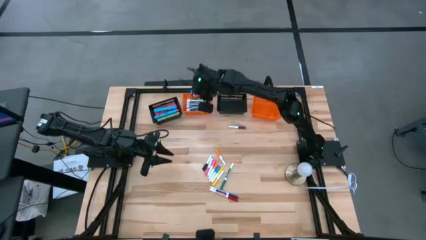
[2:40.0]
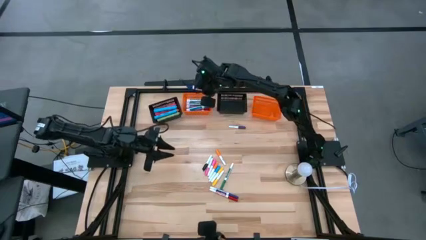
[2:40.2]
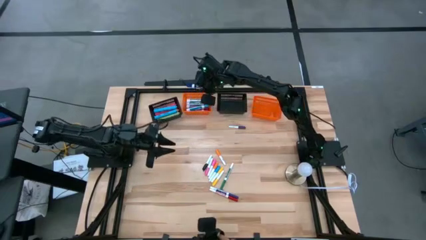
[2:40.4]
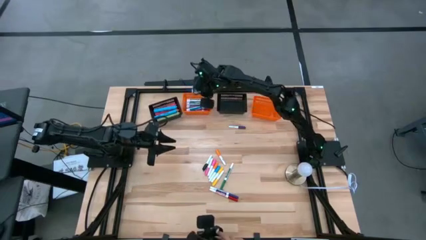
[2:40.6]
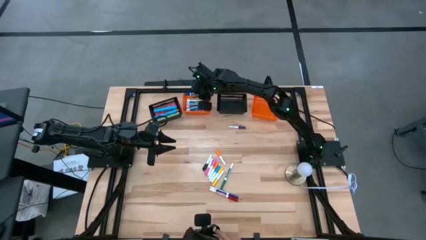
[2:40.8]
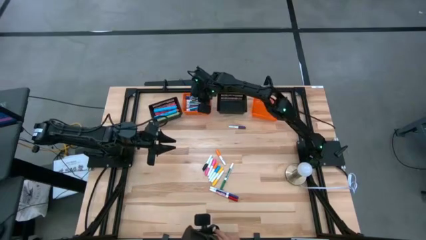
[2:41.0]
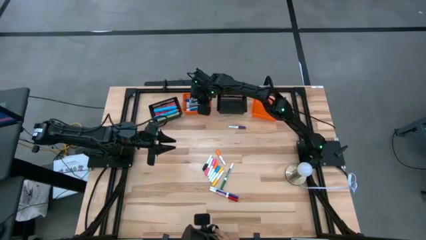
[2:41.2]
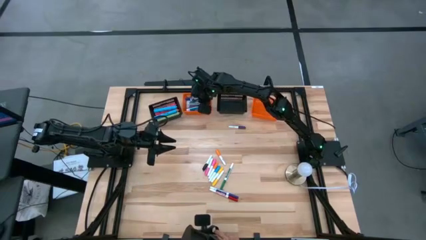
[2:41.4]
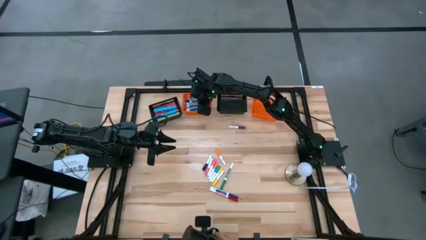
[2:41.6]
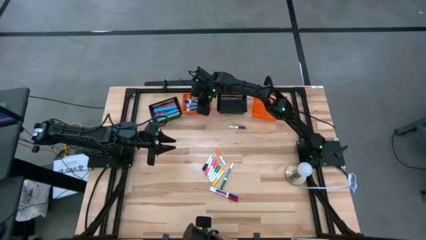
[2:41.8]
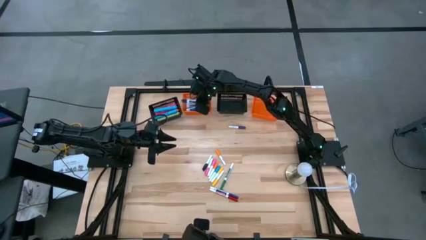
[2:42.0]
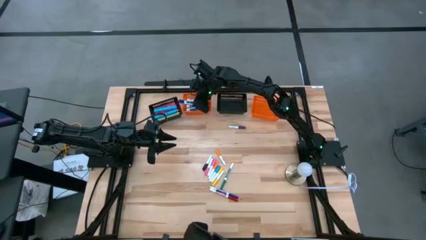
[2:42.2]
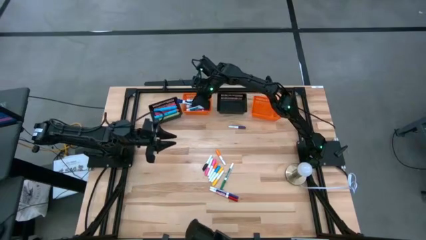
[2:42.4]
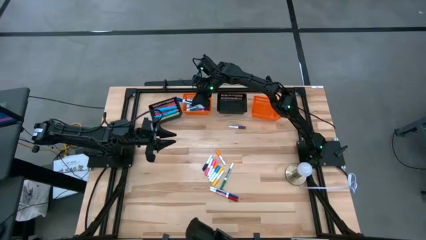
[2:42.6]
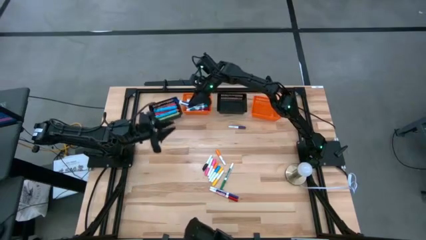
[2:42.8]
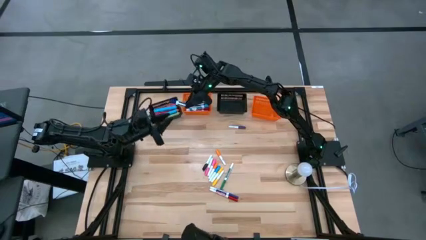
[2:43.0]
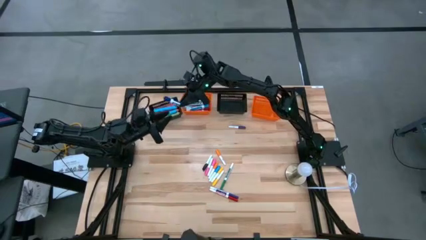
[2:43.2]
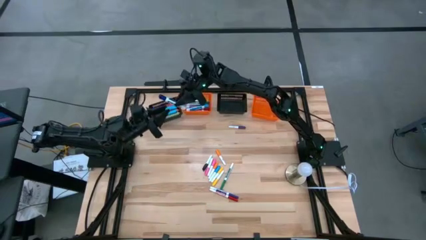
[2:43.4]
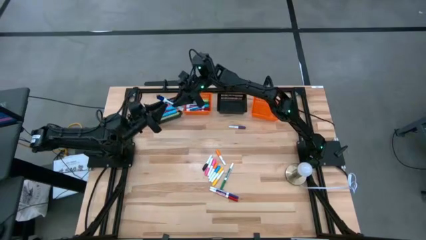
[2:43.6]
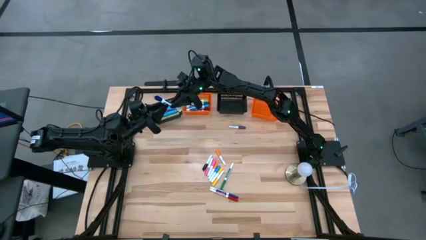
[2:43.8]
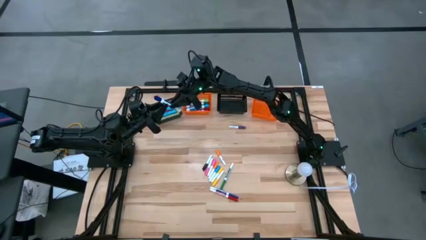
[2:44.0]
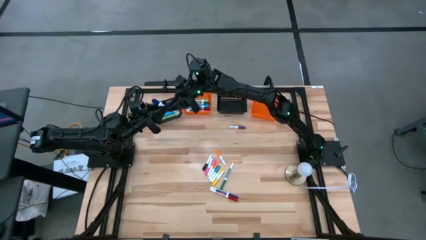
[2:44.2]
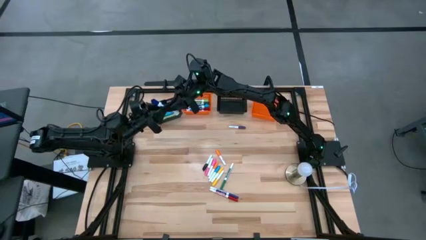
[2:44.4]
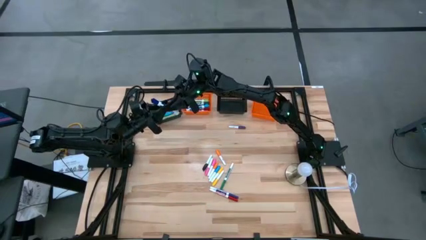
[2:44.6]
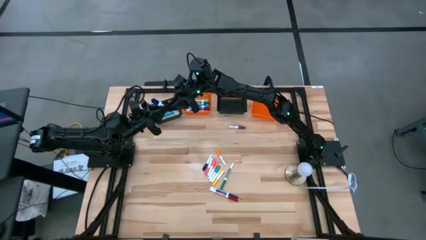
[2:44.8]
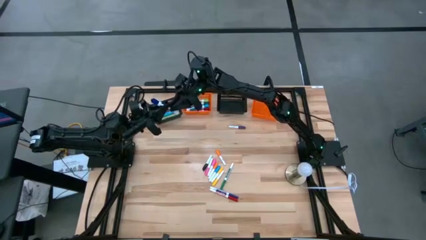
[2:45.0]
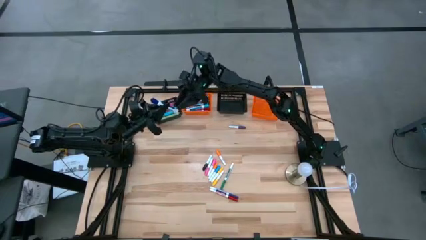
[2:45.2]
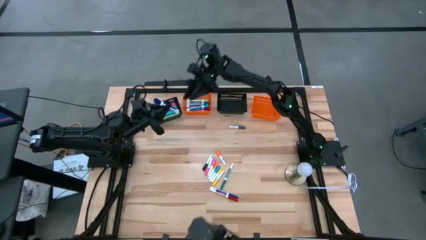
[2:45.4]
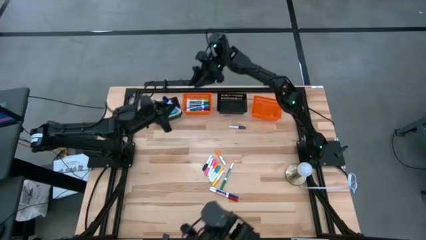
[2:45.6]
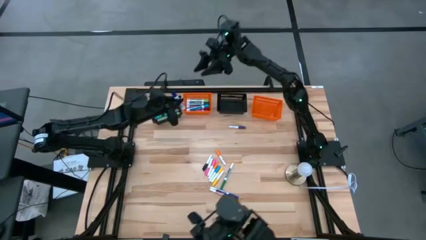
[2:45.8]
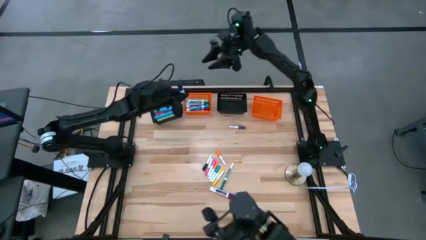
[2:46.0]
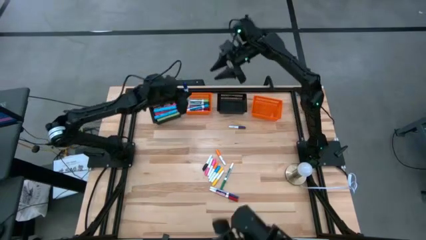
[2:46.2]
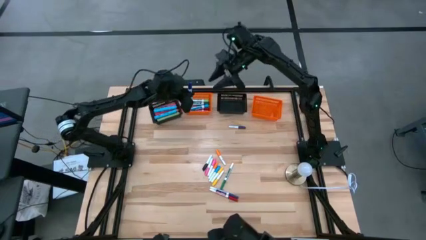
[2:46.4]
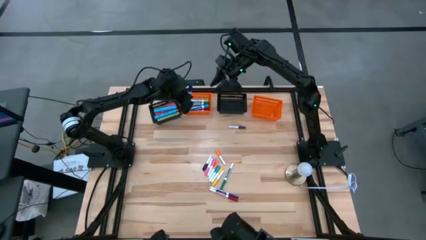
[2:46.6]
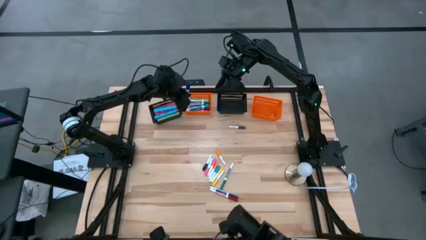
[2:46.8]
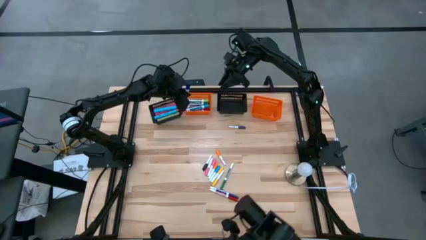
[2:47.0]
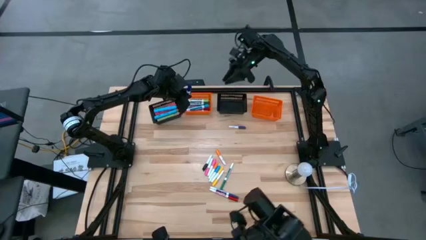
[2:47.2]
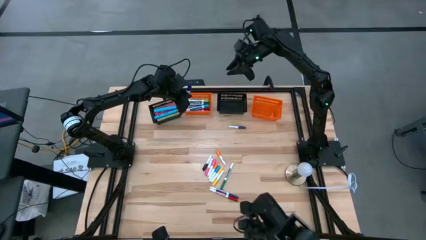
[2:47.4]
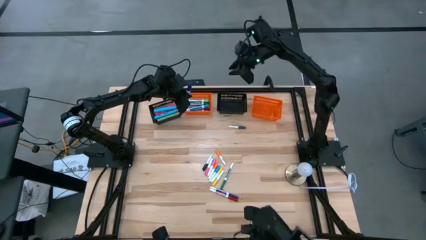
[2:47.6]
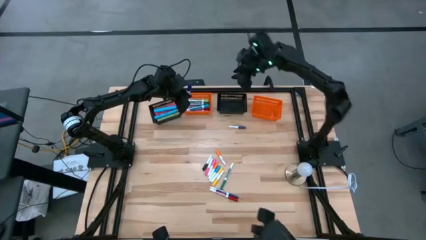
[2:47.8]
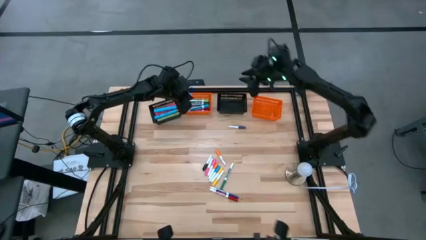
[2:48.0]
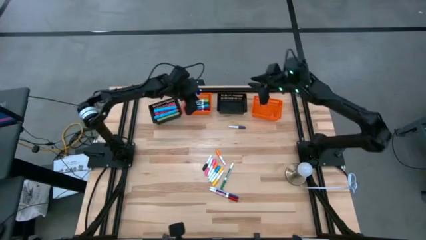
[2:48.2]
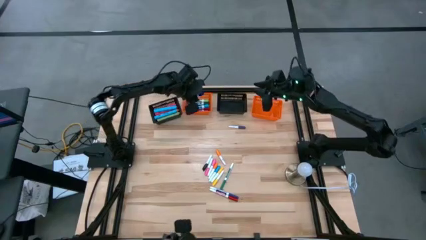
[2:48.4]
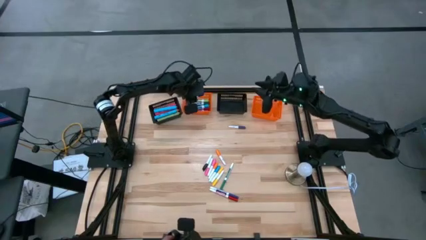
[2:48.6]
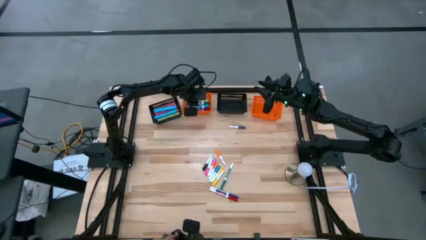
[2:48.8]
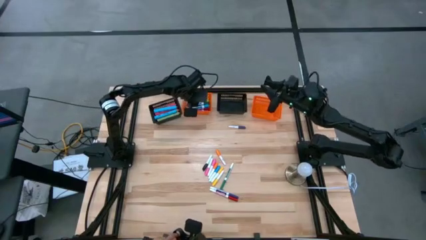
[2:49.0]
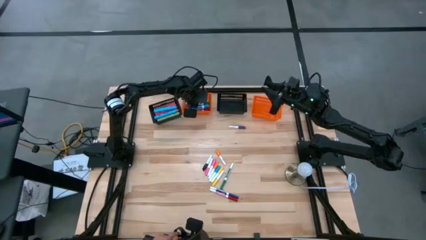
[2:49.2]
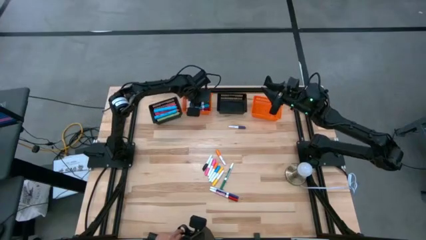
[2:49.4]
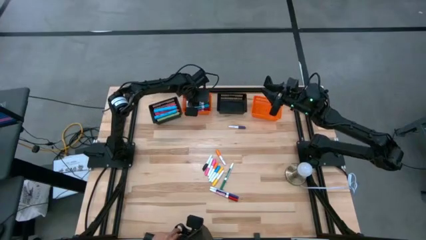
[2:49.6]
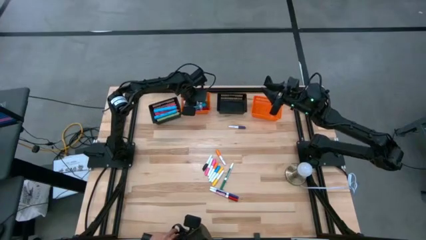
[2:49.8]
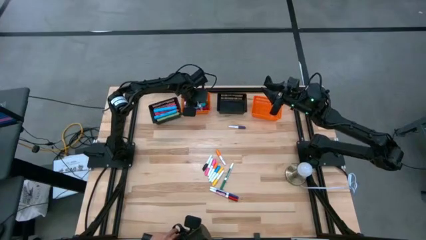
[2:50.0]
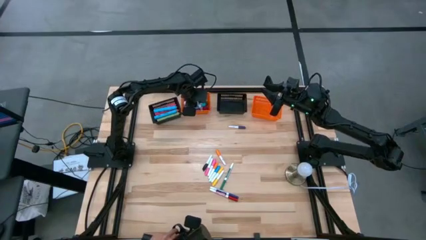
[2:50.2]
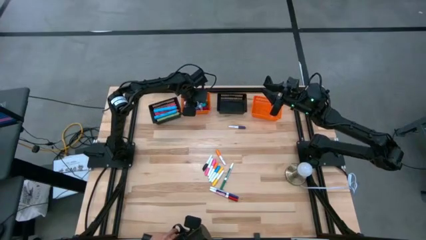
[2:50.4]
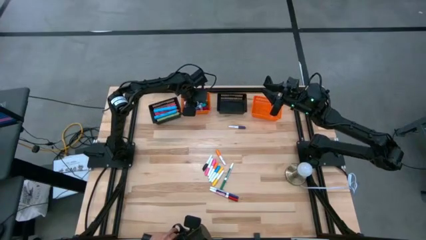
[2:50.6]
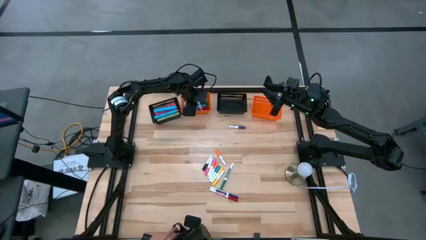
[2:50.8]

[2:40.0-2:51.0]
Task: Pick & Place Markers
Put the blue marker pen into the left orange bin

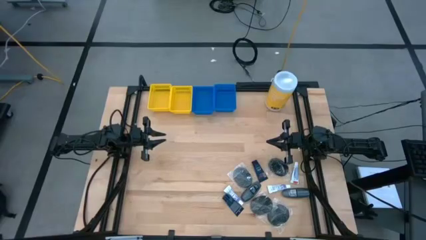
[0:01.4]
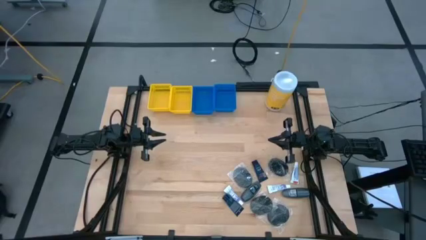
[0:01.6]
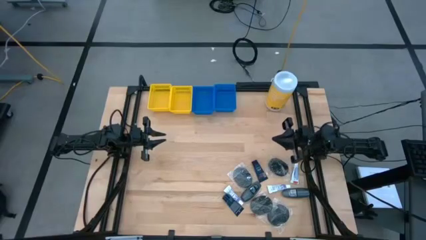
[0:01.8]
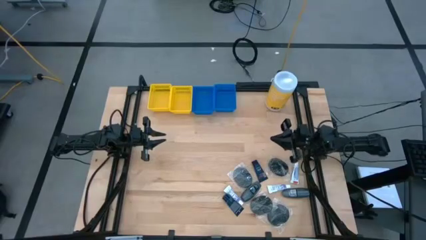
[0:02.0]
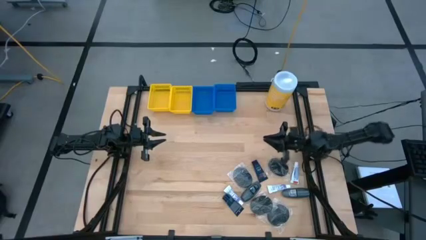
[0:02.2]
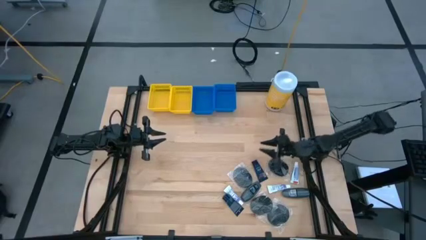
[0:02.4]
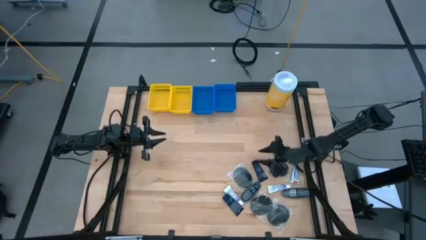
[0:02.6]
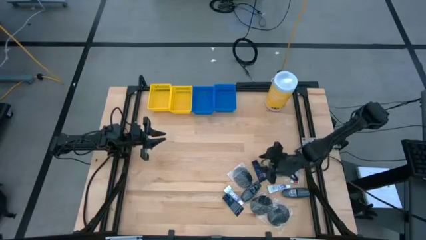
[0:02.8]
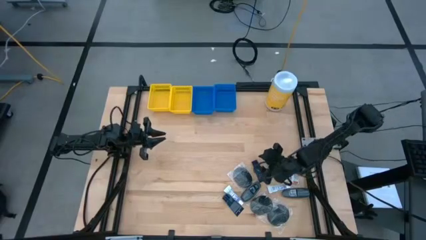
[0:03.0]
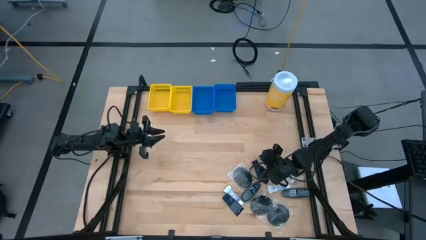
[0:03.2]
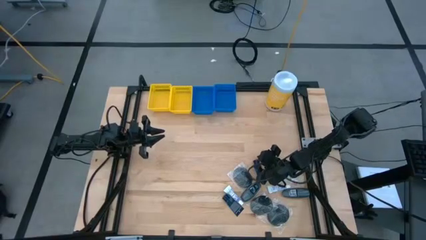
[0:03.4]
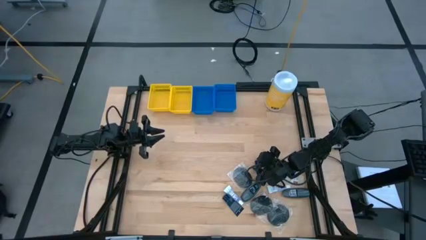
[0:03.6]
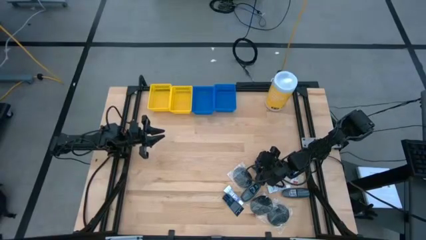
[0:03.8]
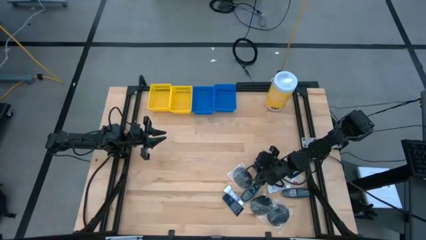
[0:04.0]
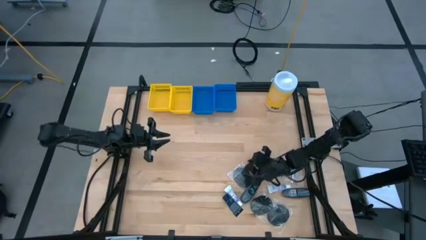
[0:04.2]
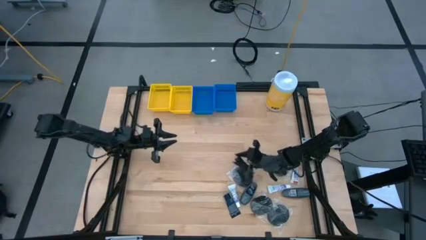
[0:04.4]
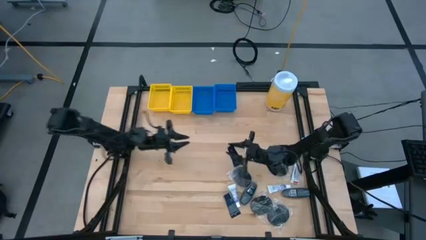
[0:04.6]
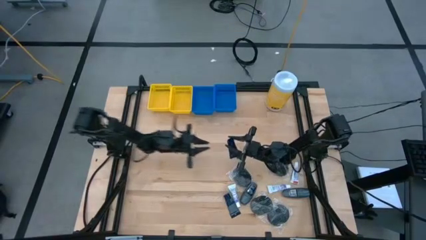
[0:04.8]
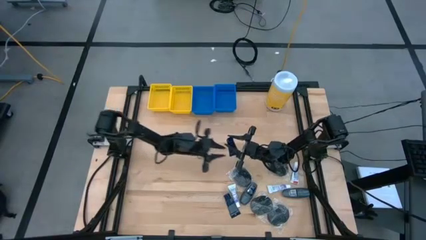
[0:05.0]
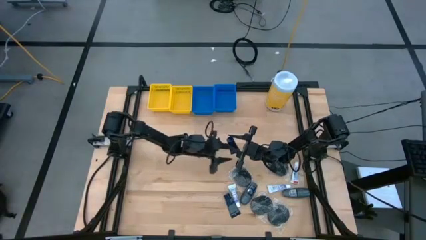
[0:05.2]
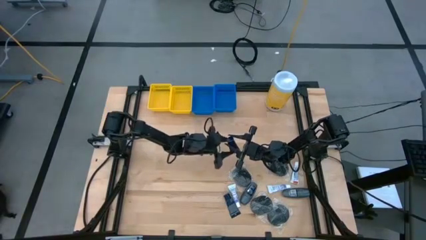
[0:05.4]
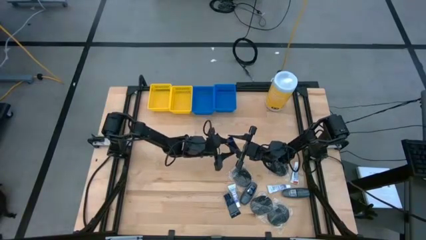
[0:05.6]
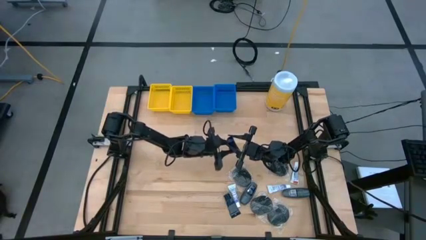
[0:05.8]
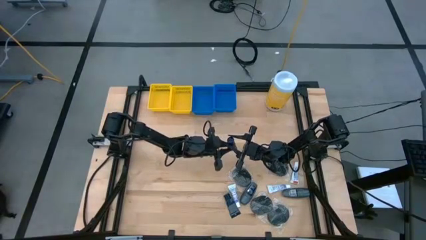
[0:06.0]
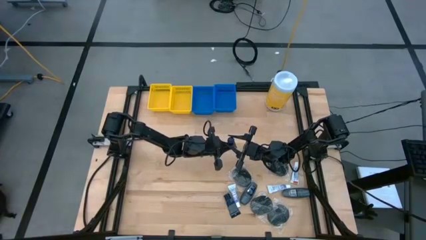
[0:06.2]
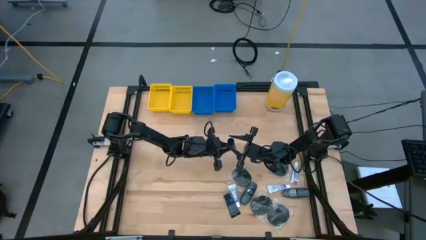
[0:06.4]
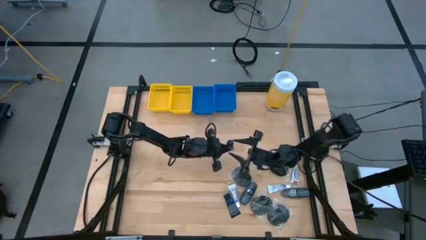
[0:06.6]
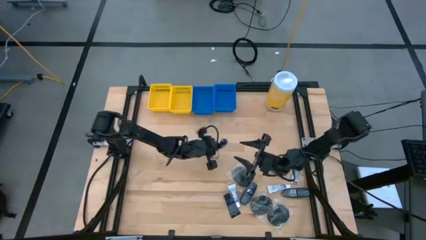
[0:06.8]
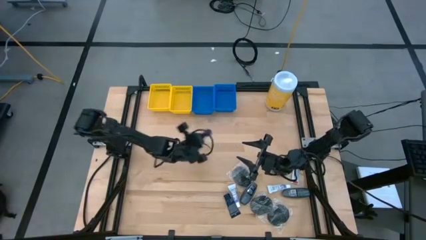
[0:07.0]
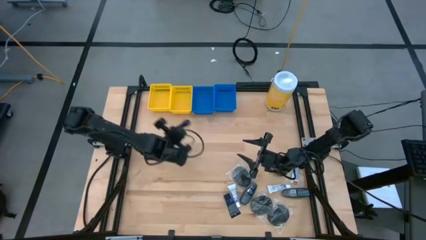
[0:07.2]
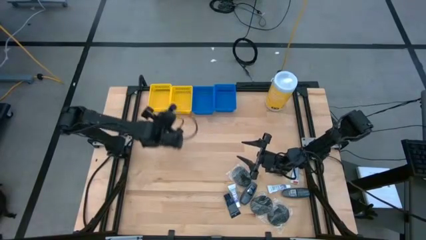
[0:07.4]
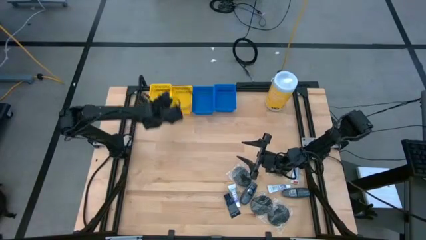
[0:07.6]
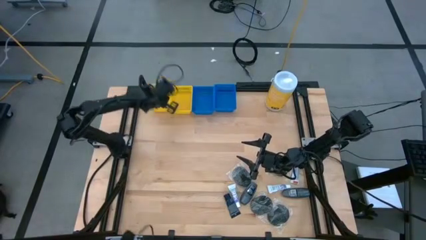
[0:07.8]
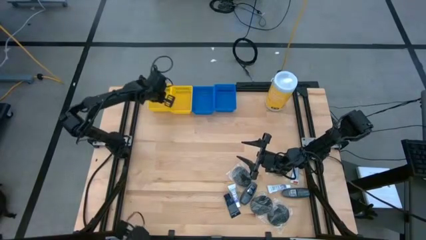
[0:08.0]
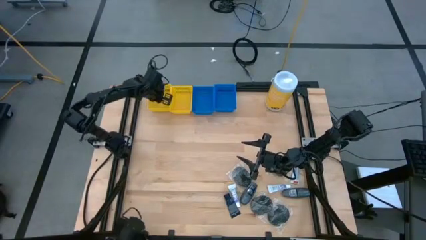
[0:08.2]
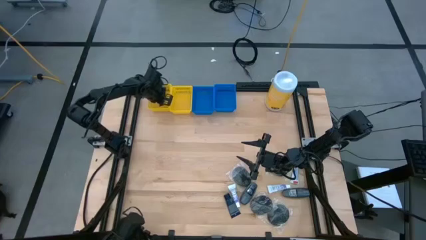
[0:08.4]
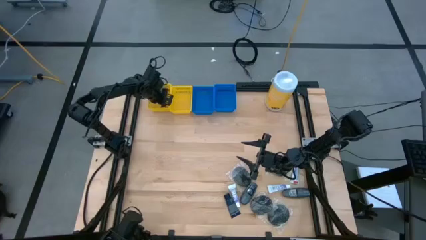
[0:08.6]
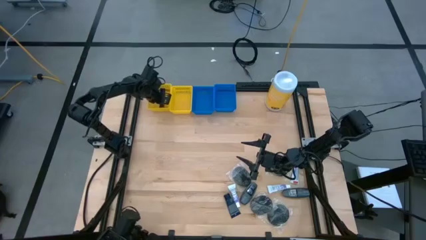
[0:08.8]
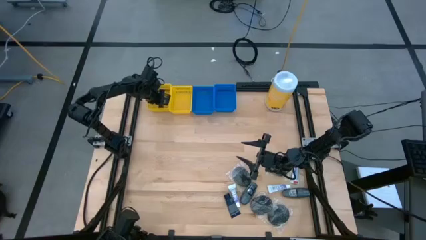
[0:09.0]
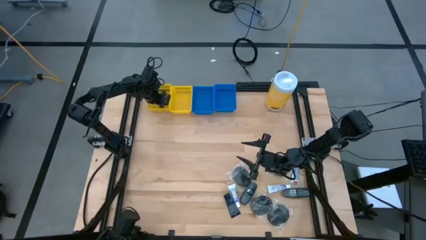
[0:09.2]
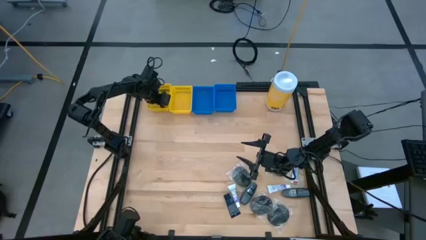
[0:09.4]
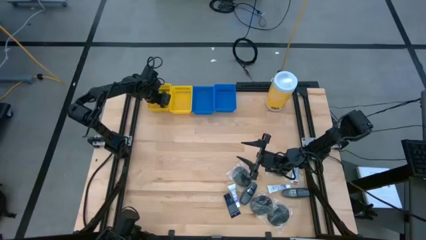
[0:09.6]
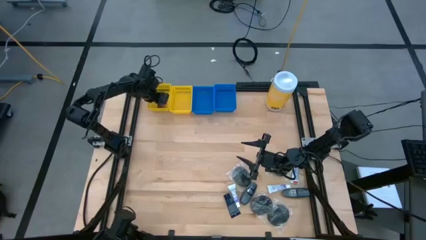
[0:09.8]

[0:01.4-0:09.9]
Task: Pick & Place Travel size toiletries
Put the blue shave cream into the left yellow bin
